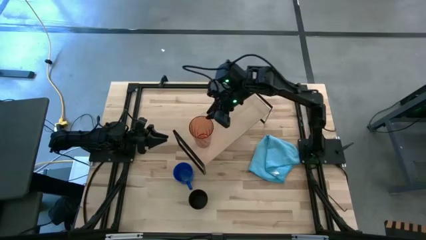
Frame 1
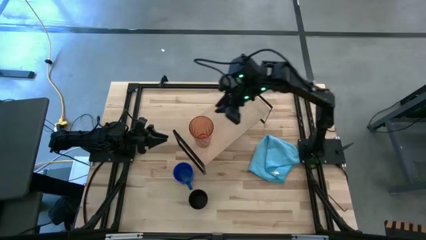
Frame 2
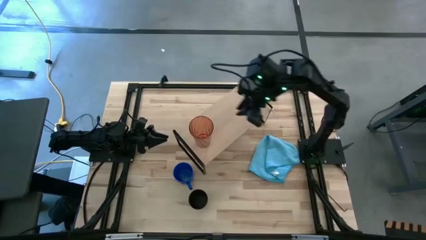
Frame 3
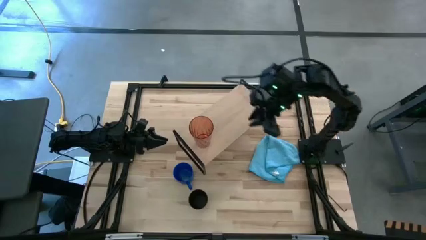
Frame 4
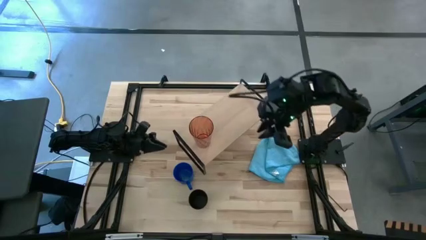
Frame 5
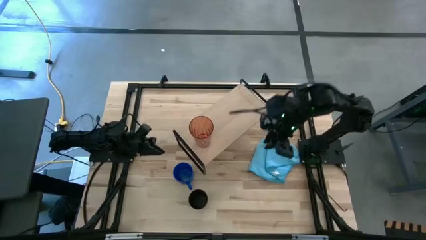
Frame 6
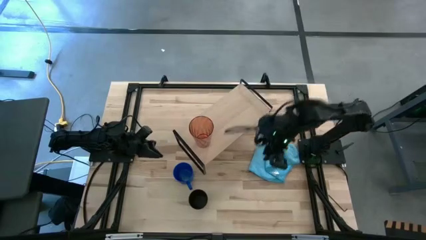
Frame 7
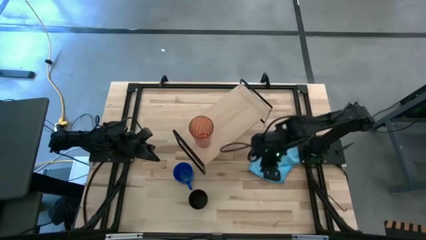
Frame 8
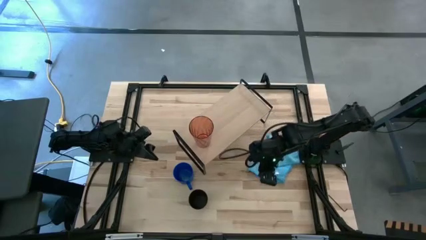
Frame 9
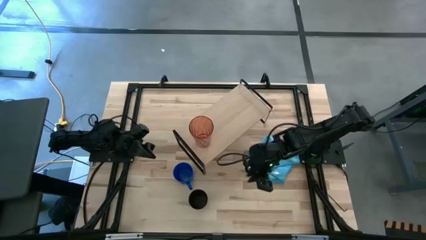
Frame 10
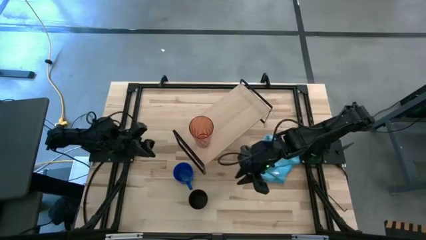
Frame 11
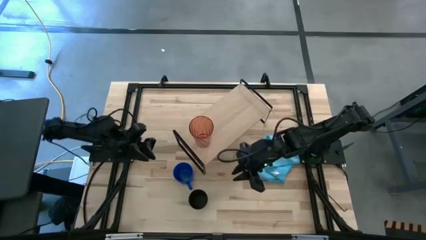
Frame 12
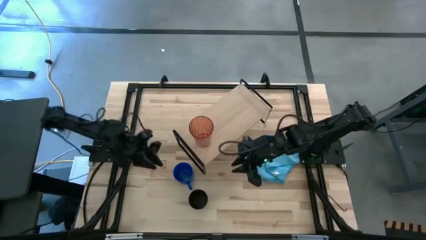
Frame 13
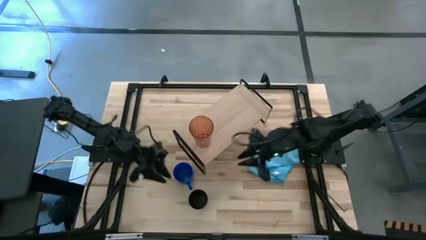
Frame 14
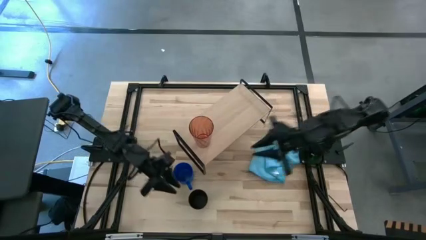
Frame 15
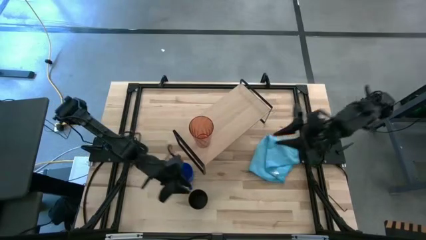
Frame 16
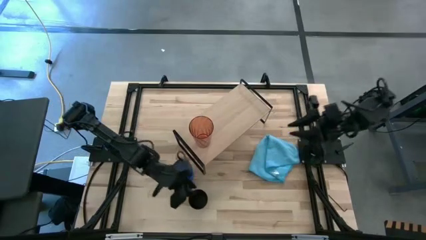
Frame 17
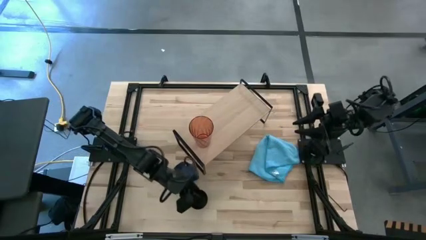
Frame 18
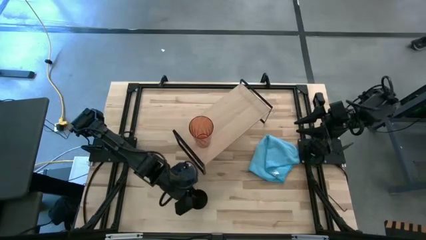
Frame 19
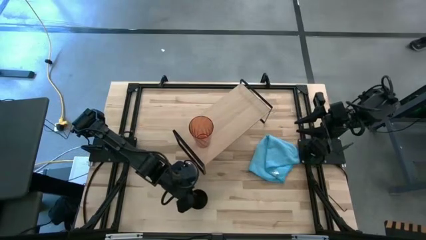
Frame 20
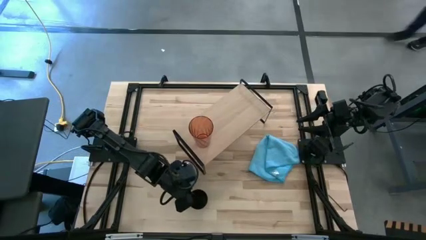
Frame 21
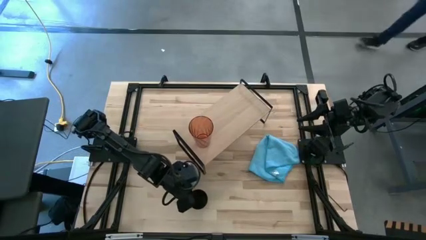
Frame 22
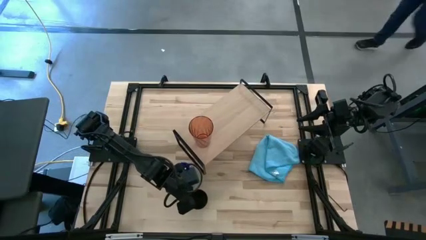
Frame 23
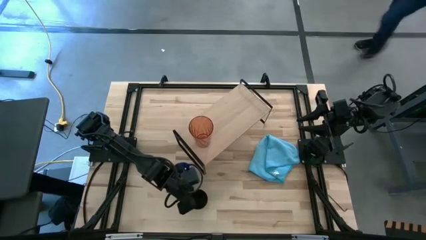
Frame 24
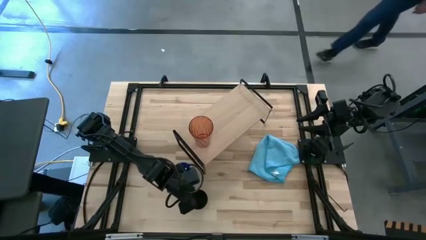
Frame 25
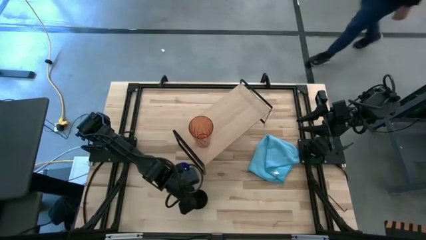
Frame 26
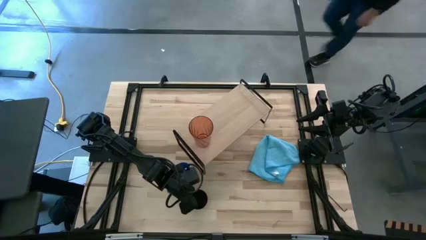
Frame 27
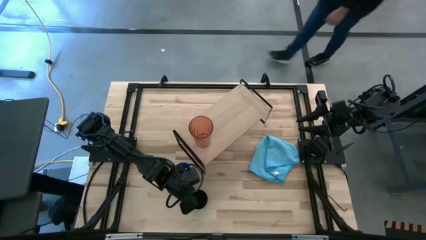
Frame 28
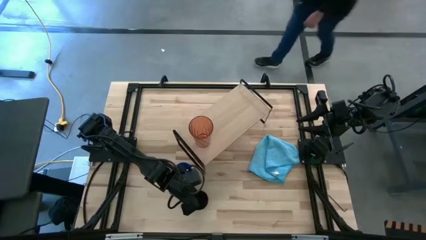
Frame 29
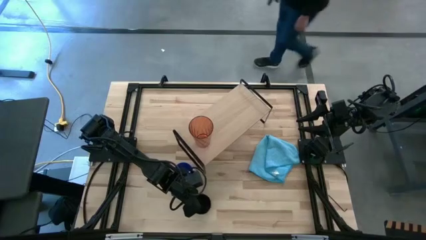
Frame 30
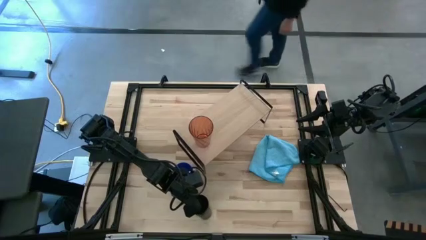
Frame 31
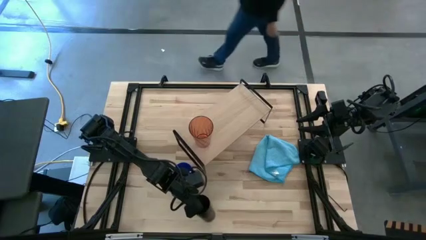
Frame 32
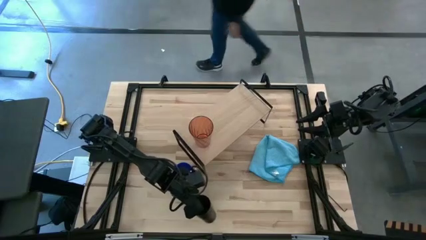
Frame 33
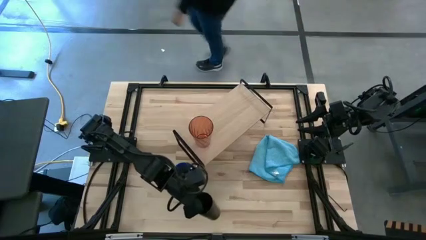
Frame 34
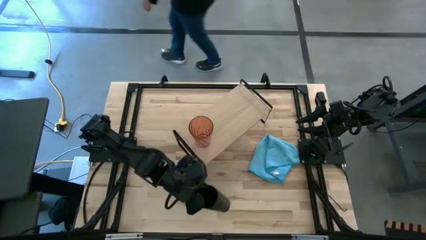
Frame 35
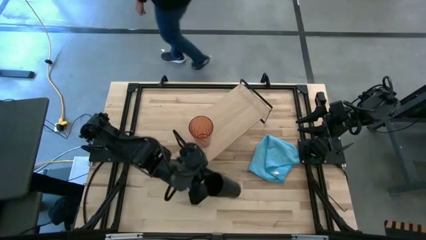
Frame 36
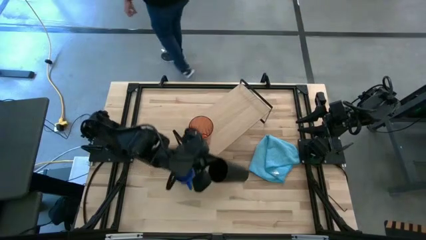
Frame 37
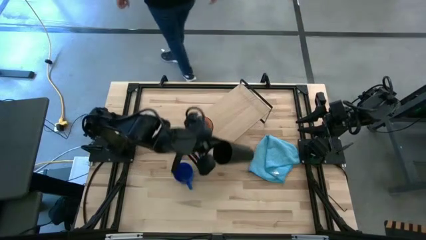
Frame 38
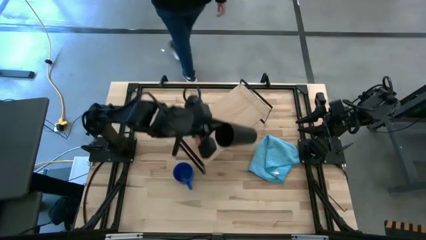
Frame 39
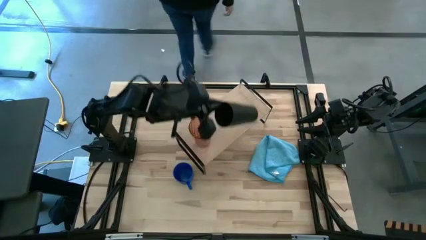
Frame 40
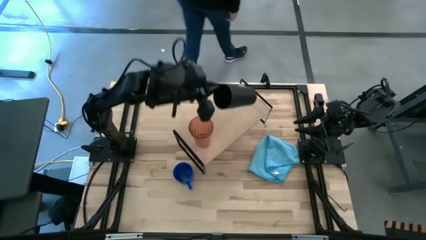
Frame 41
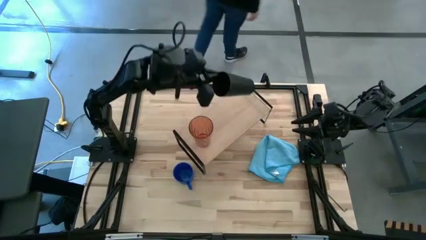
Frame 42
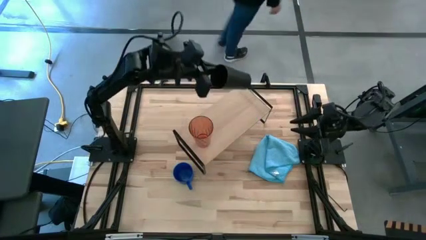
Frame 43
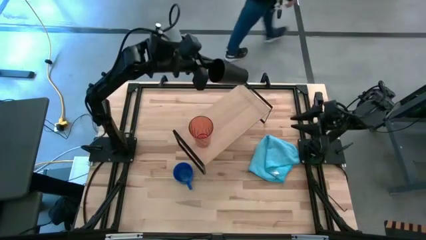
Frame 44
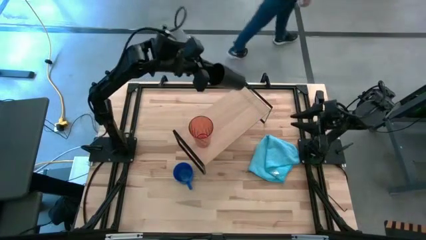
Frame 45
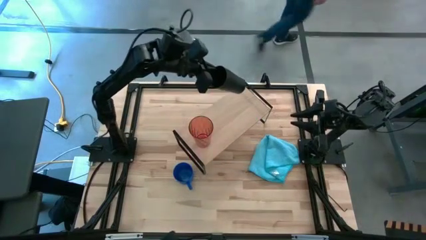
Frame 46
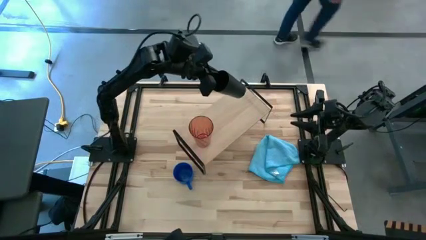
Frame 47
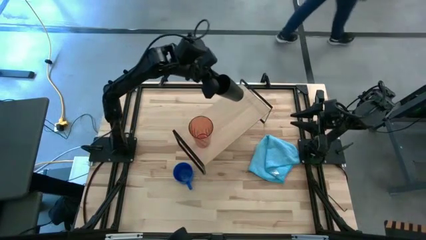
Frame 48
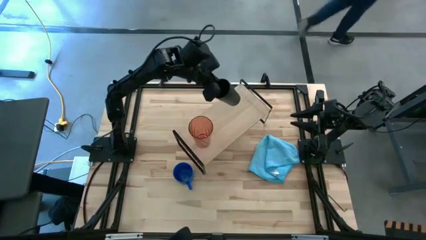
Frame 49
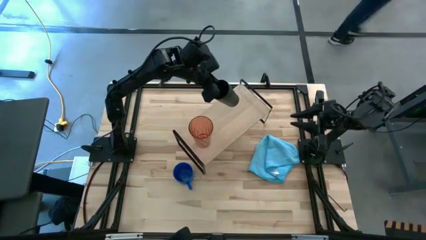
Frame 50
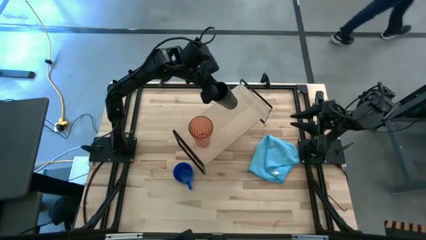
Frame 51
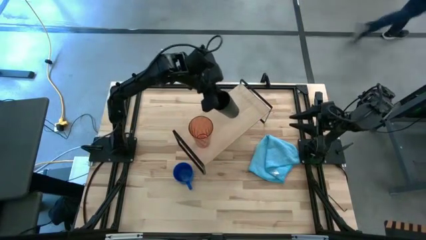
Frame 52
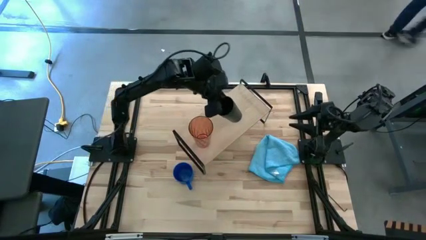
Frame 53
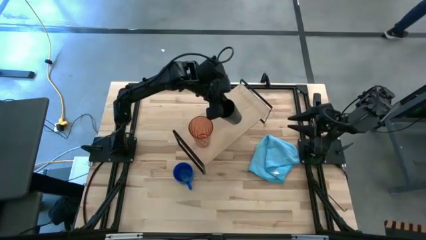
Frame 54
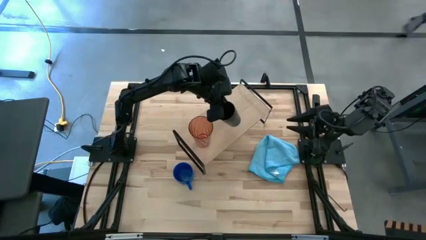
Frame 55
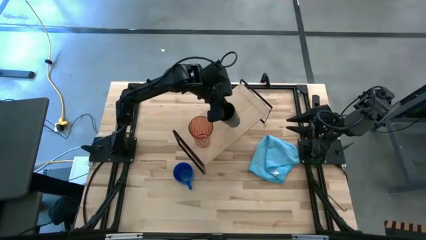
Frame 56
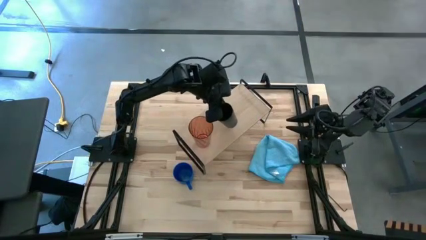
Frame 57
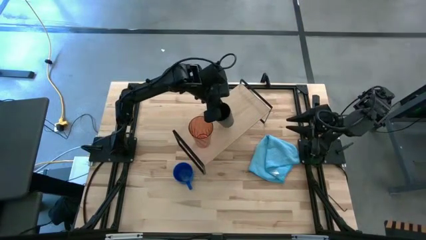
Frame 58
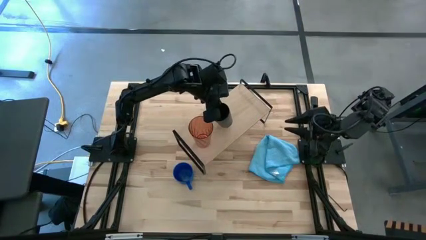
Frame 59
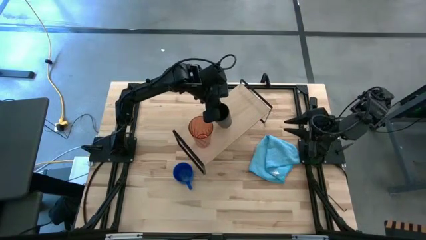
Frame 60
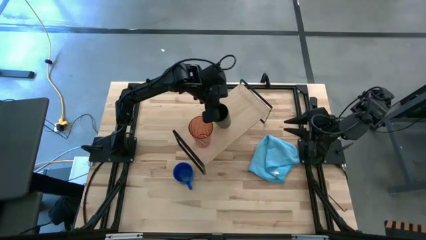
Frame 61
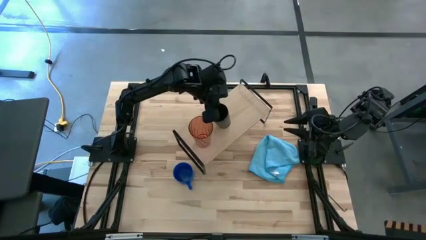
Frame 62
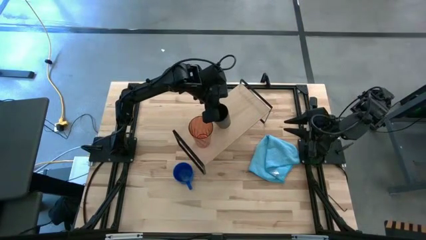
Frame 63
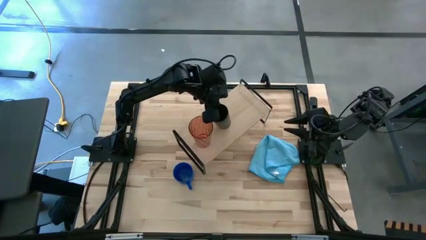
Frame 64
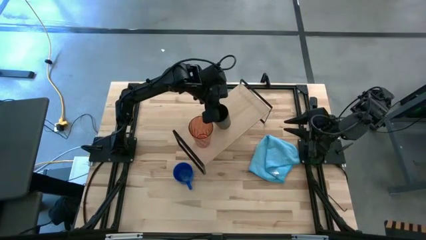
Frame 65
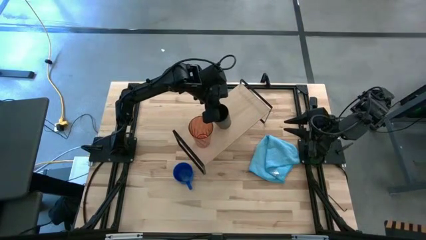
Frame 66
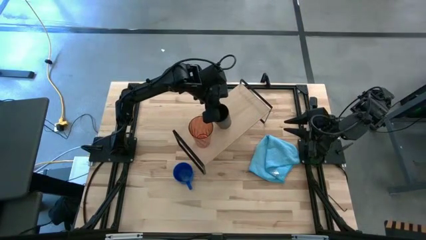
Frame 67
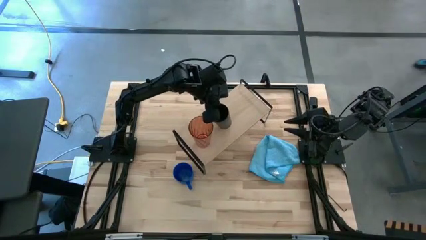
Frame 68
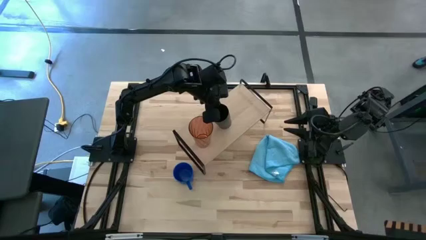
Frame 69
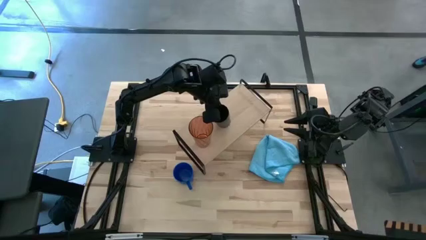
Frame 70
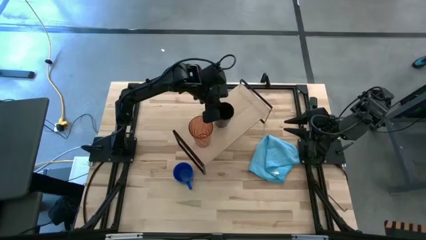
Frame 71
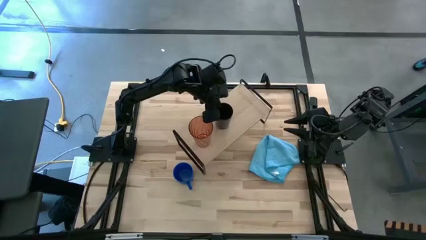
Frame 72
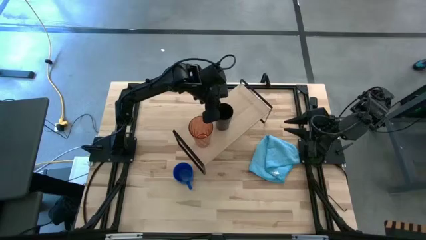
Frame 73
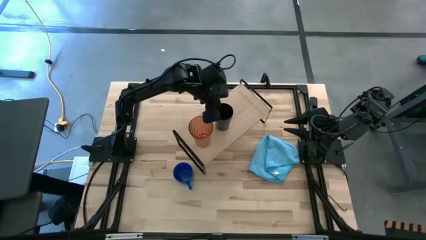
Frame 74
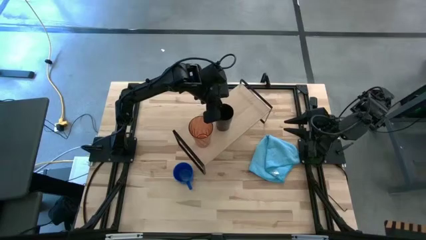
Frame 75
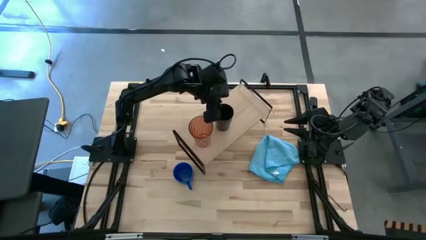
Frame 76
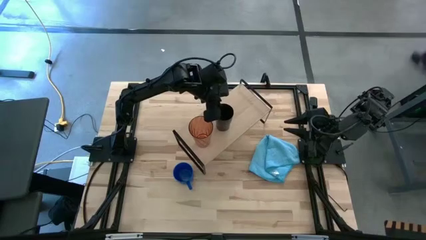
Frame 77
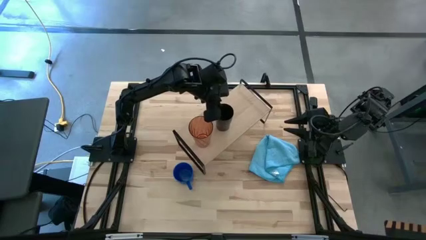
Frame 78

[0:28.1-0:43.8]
Task: Stack small to large cups/mugs on shelf
Put the black cup on the shelf
